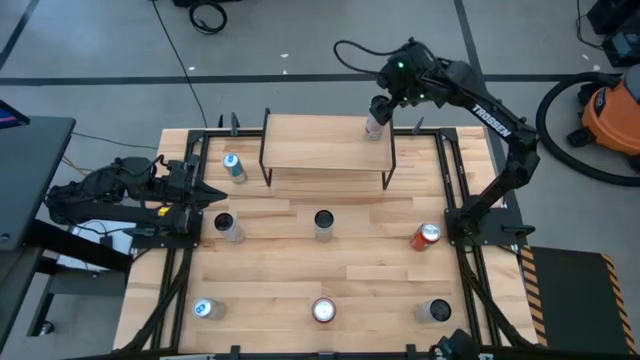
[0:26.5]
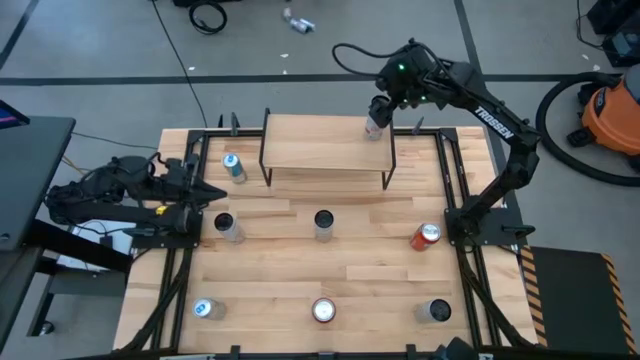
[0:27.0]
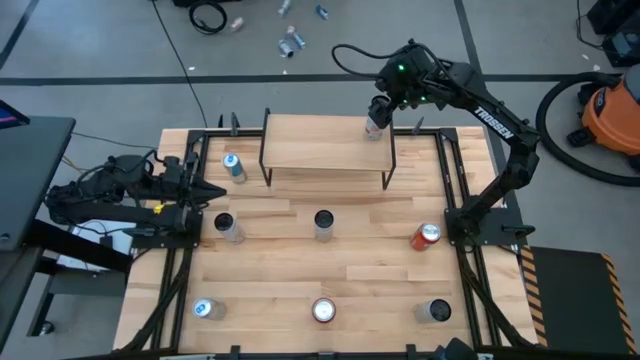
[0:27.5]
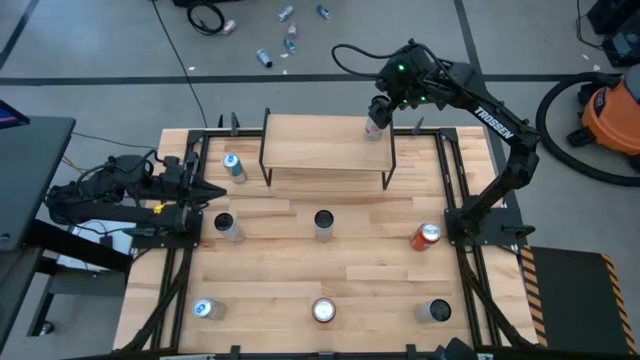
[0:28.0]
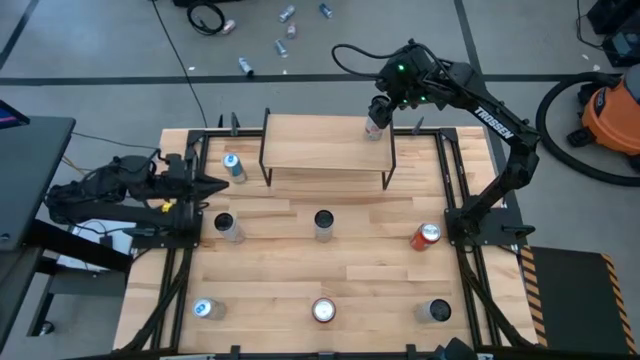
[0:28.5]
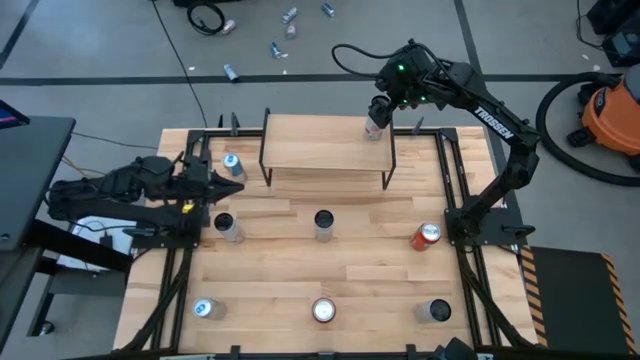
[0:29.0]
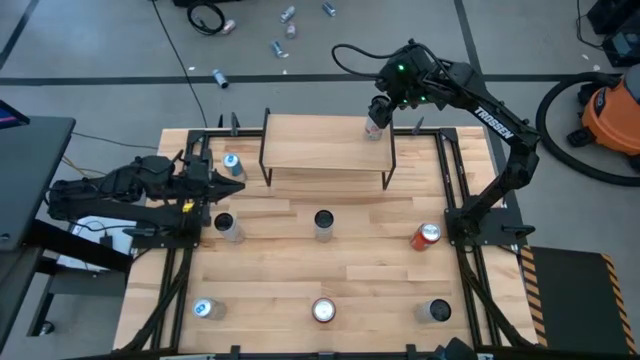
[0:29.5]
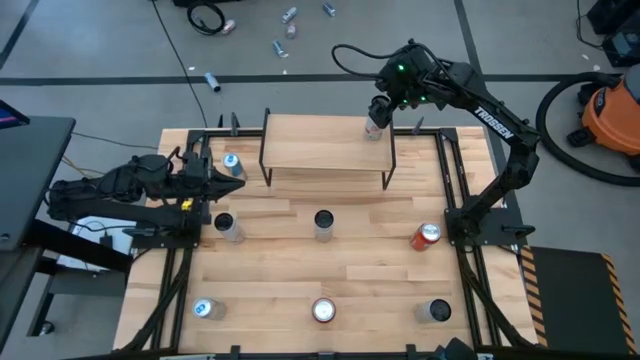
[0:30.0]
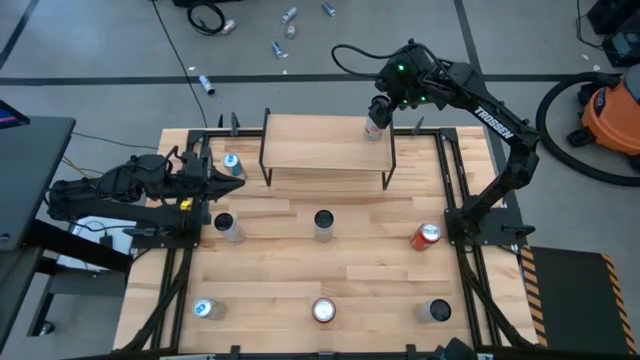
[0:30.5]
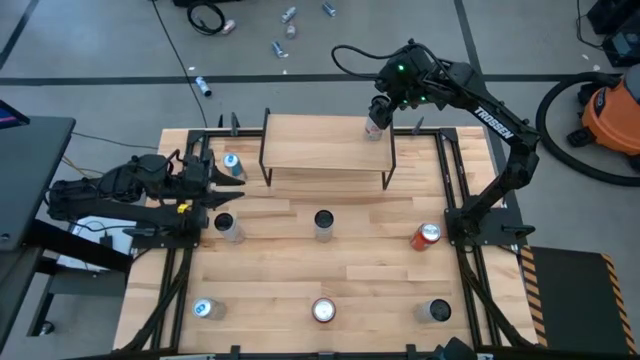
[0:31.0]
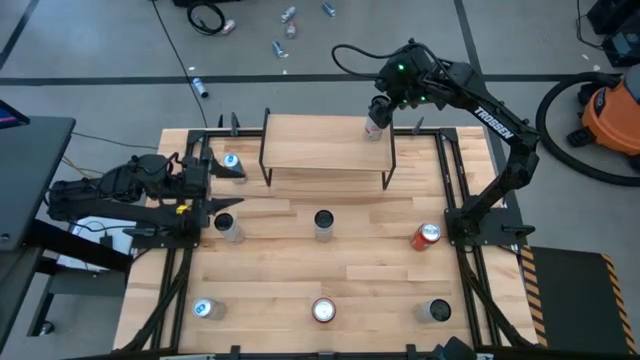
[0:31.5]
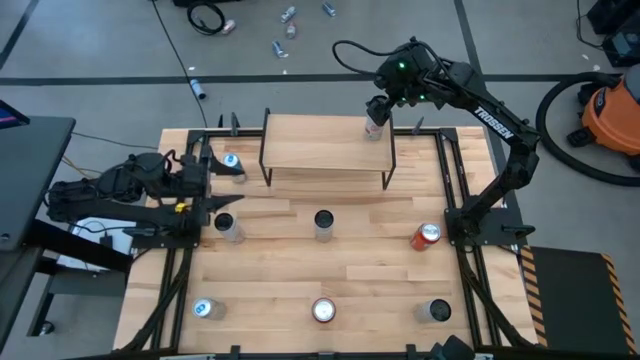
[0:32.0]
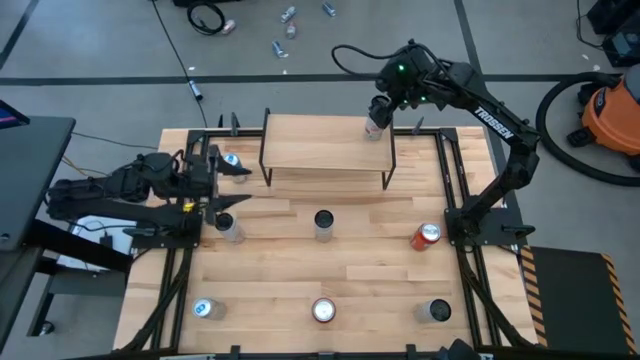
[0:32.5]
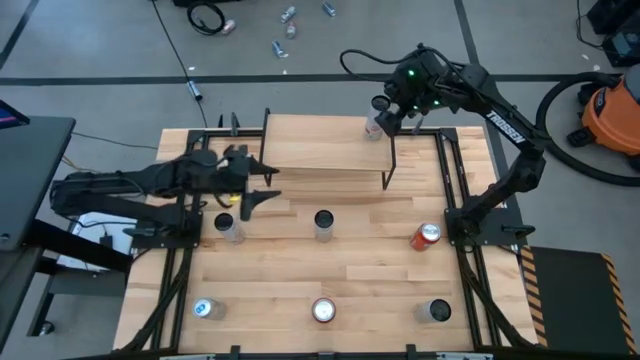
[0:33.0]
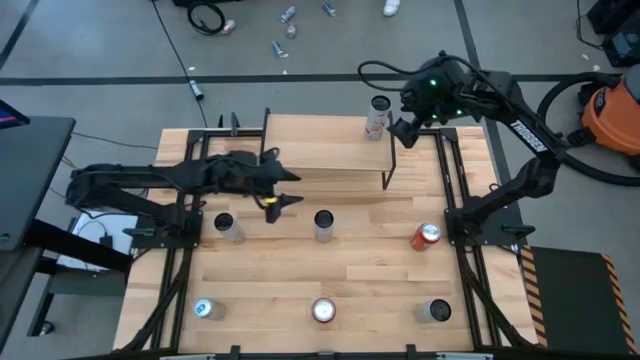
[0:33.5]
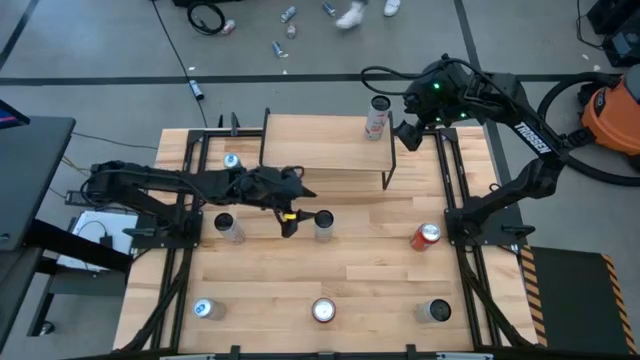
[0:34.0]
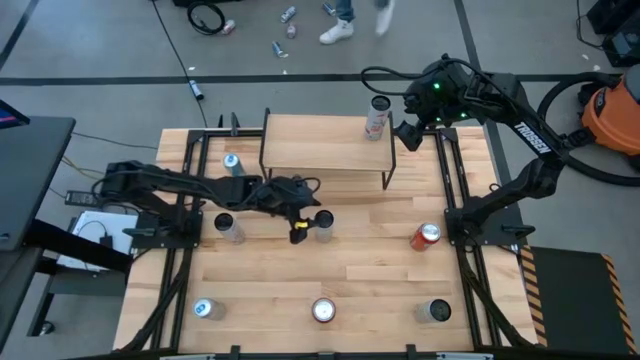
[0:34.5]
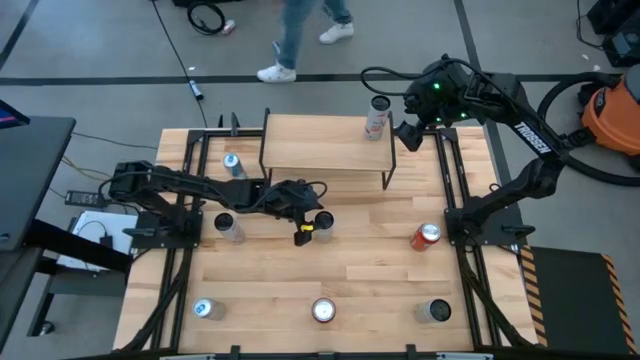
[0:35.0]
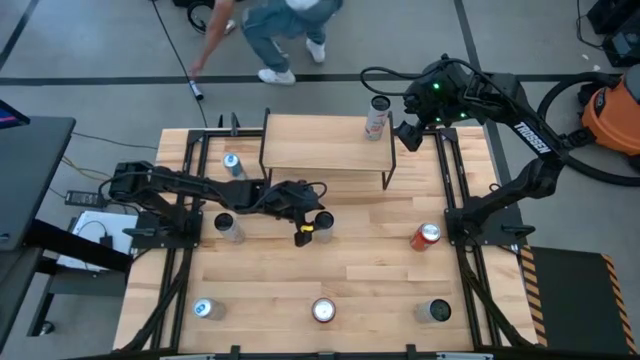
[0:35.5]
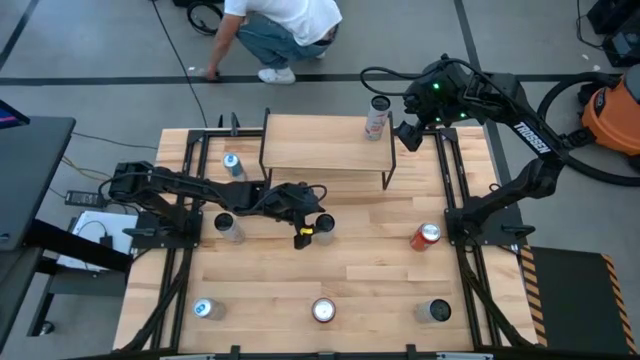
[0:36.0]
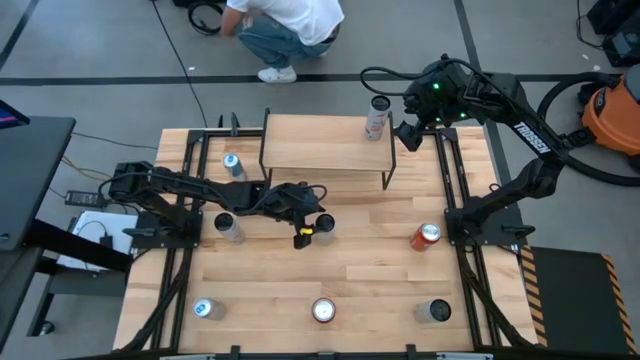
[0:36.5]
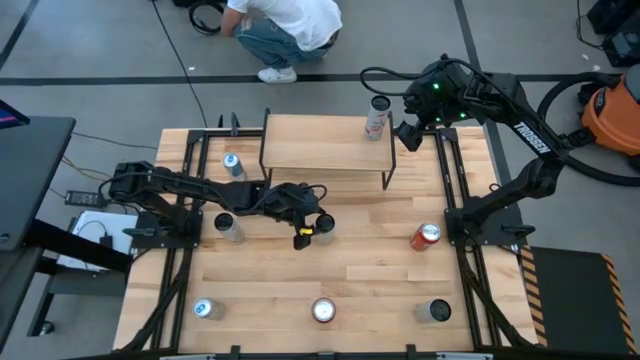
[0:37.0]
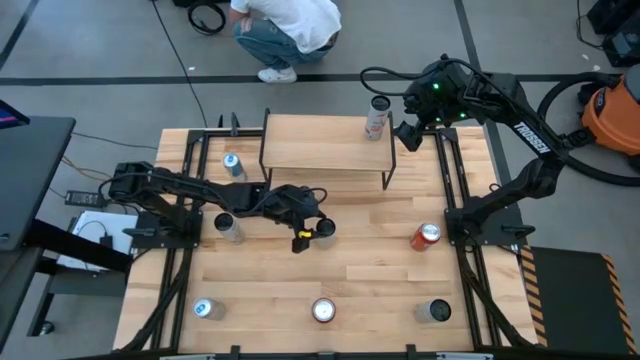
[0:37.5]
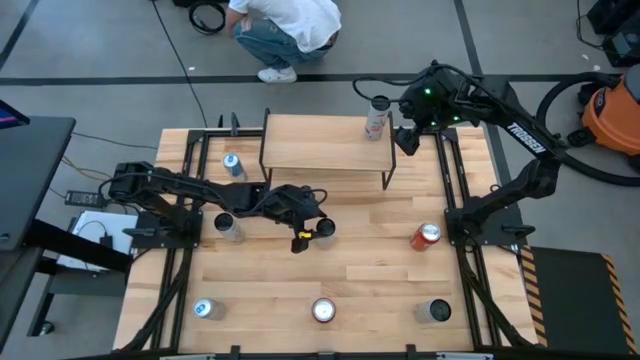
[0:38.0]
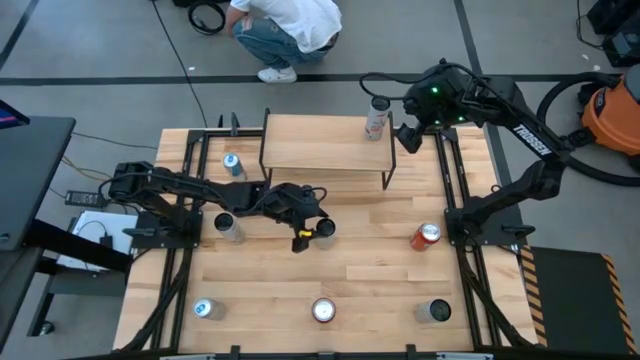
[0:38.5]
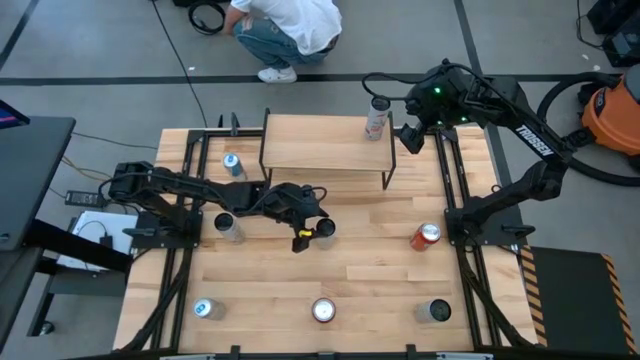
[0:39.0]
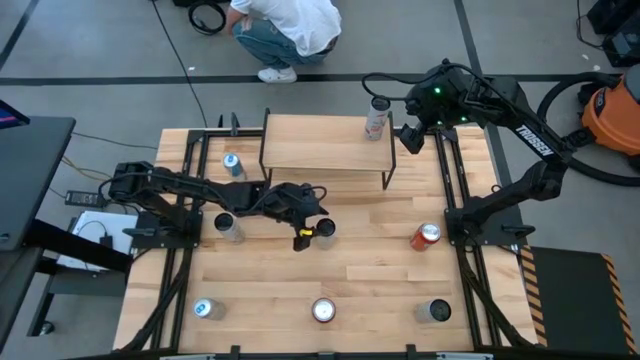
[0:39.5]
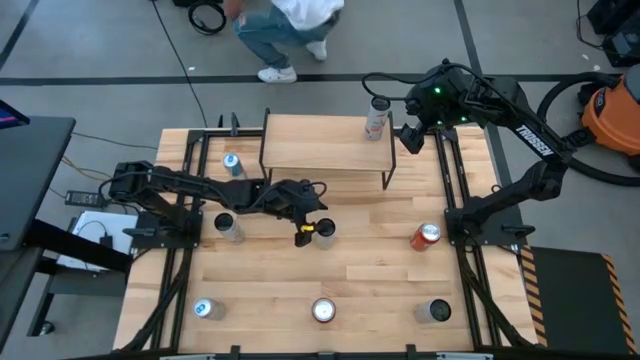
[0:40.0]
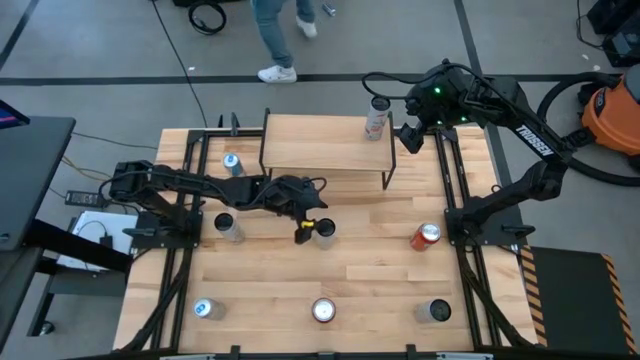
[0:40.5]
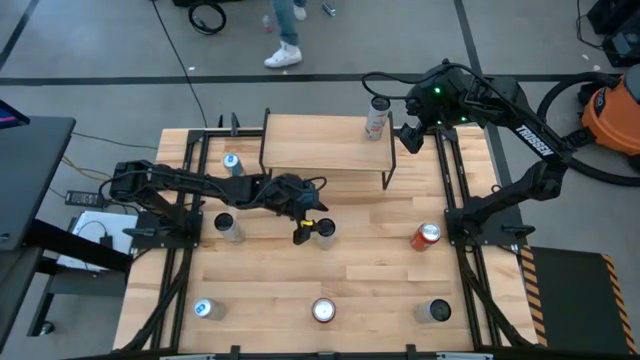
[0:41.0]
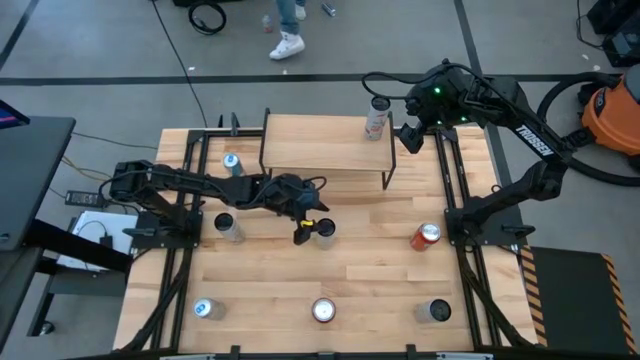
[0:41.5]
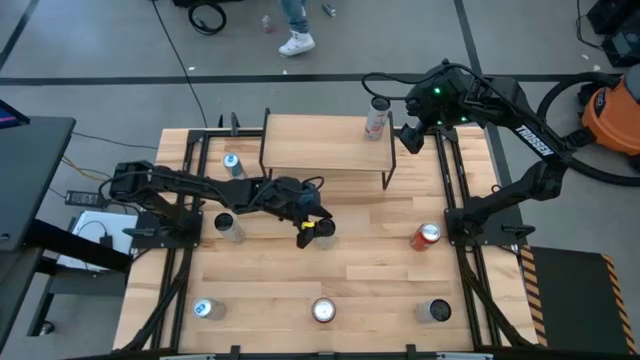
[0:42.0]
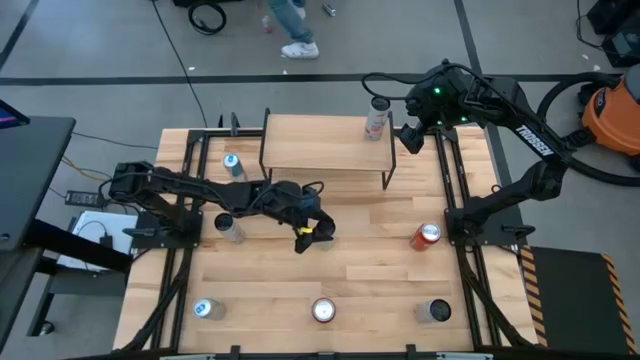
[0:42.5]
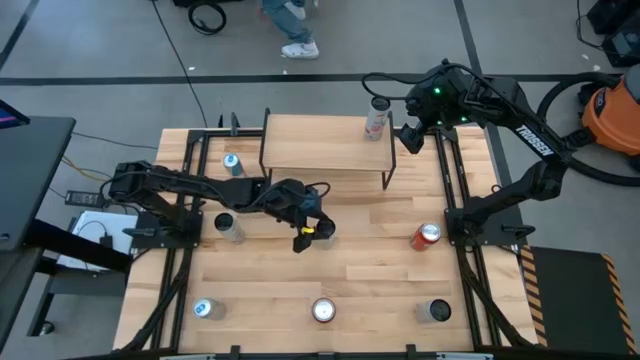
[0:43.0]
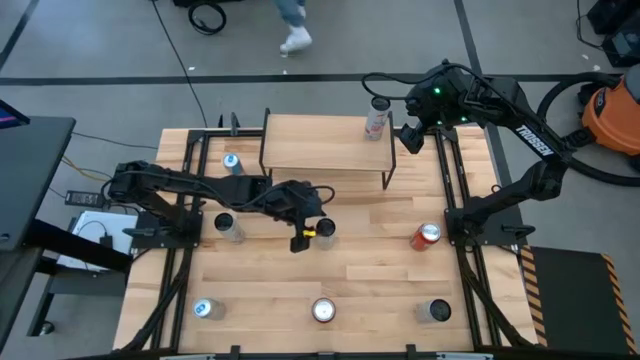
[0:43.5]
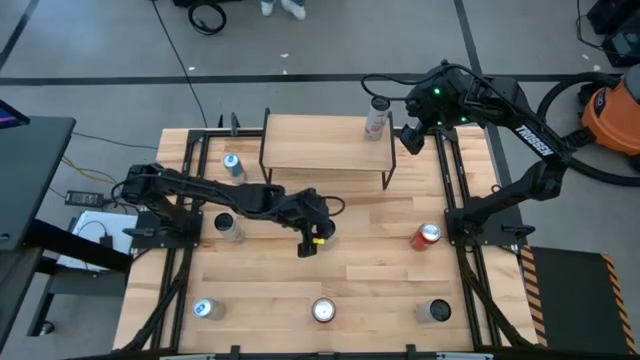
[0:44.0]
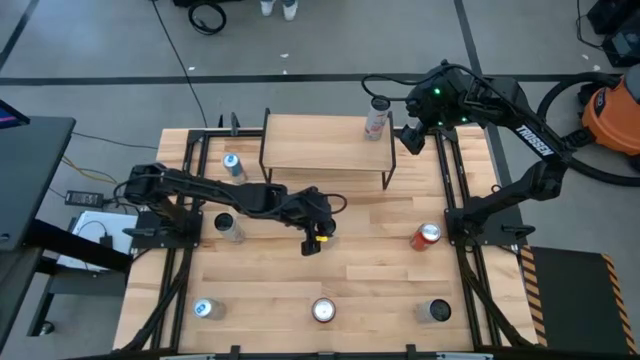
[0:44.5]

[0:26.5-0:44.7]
Task: Place canned beverage on shelf
Put the top white yellow soda can on the shelf
